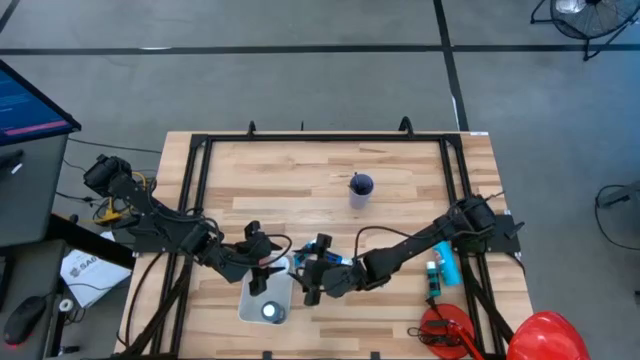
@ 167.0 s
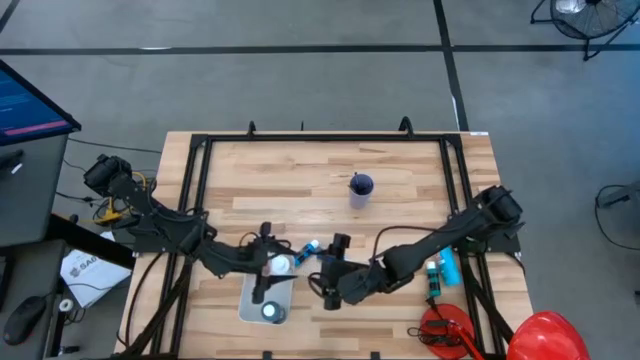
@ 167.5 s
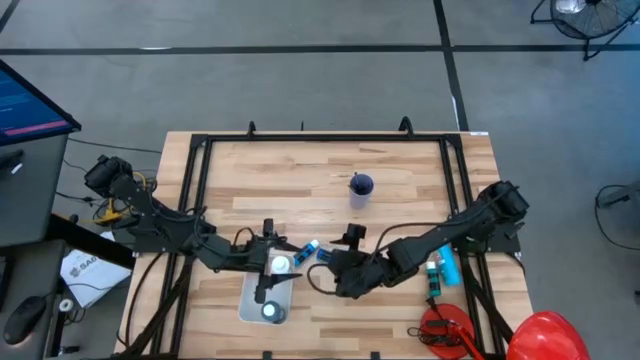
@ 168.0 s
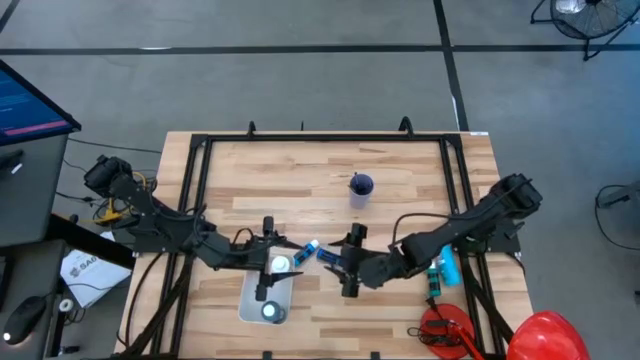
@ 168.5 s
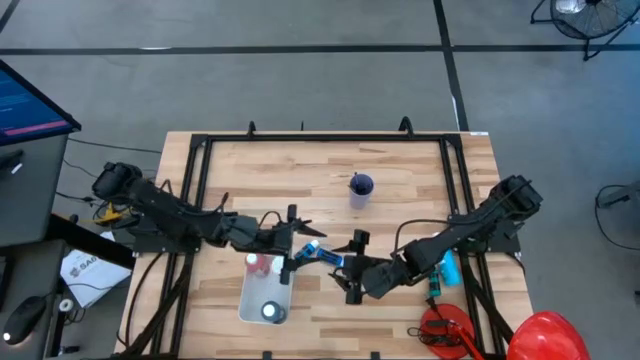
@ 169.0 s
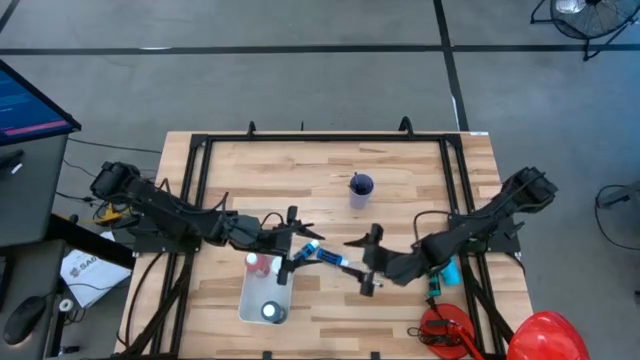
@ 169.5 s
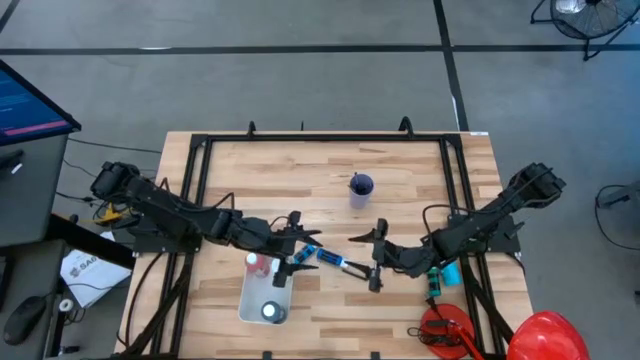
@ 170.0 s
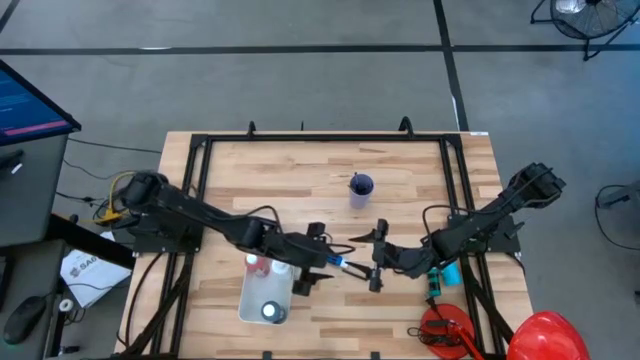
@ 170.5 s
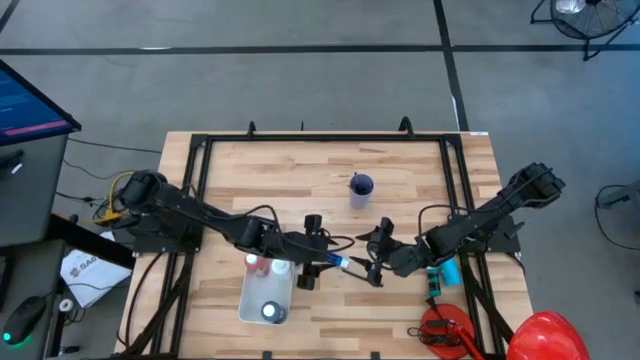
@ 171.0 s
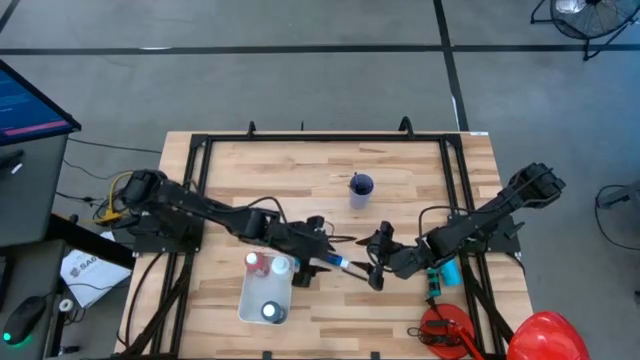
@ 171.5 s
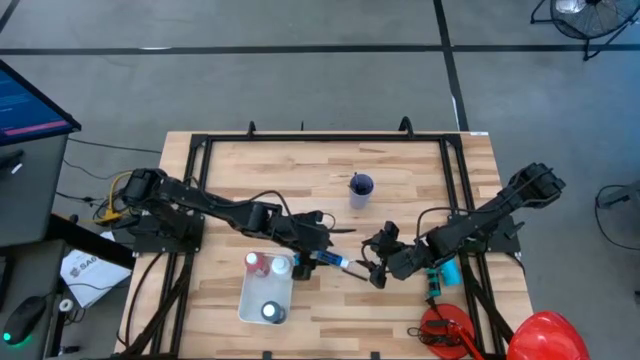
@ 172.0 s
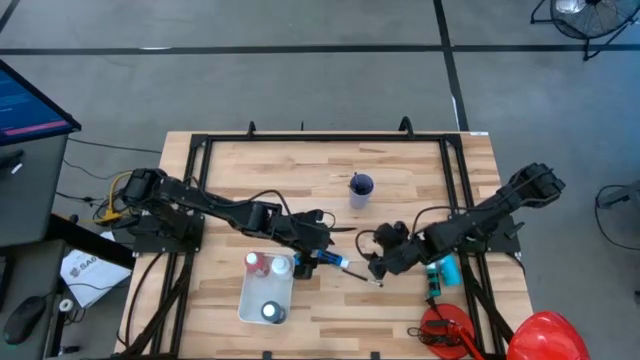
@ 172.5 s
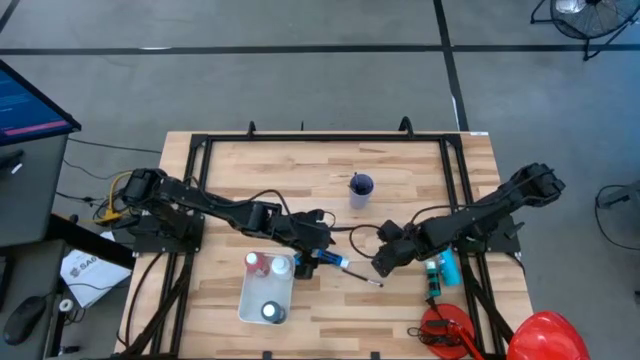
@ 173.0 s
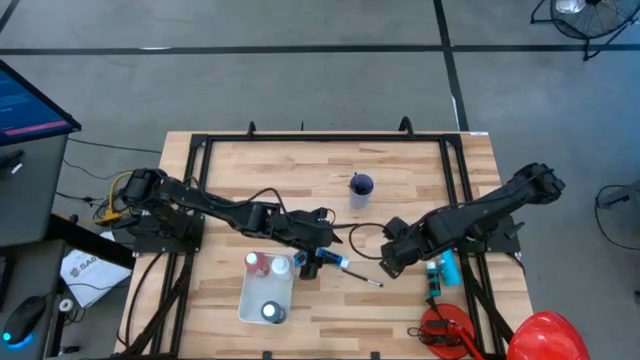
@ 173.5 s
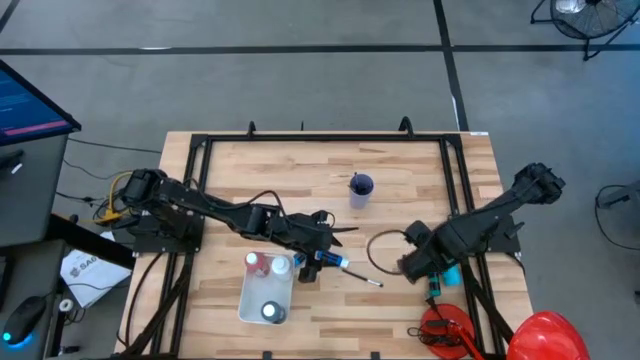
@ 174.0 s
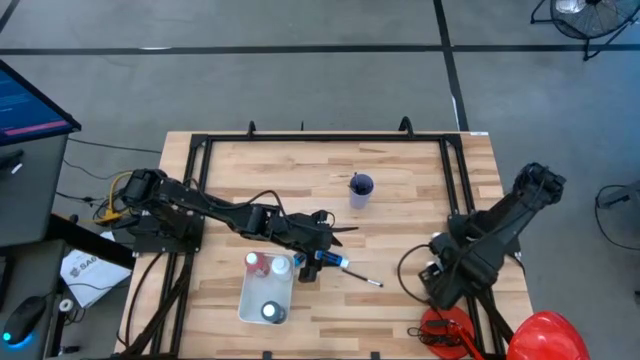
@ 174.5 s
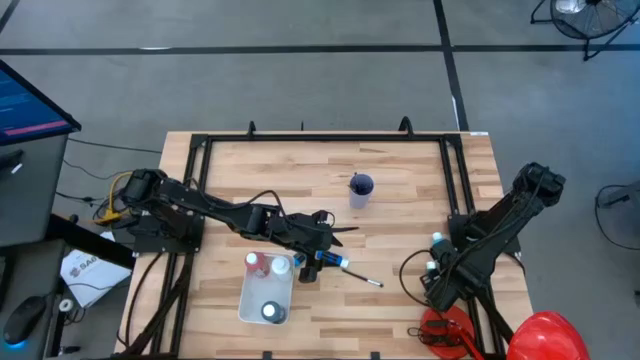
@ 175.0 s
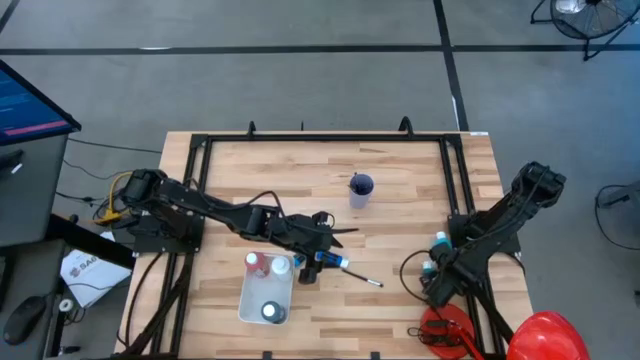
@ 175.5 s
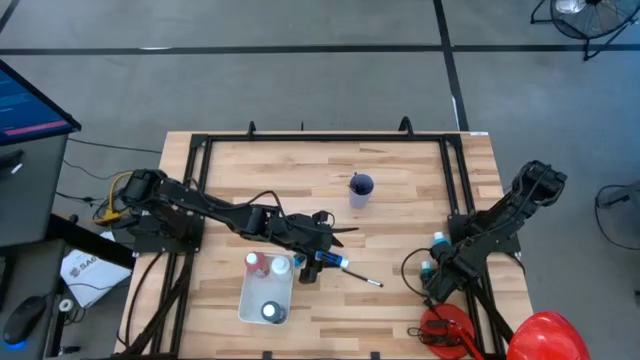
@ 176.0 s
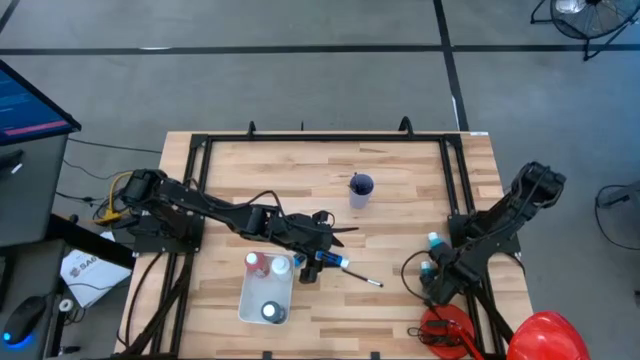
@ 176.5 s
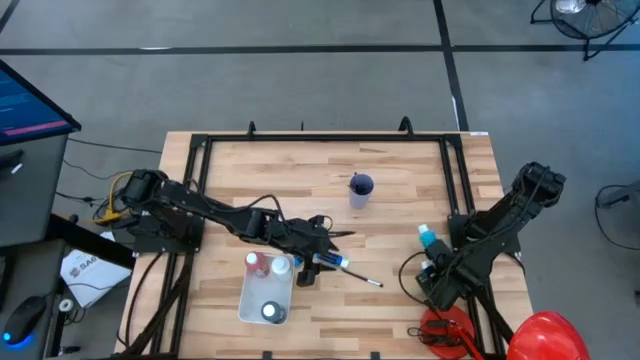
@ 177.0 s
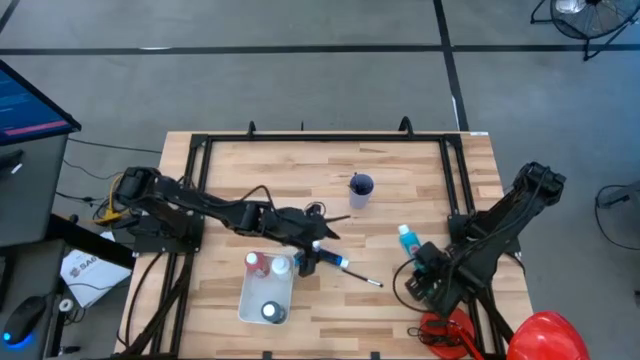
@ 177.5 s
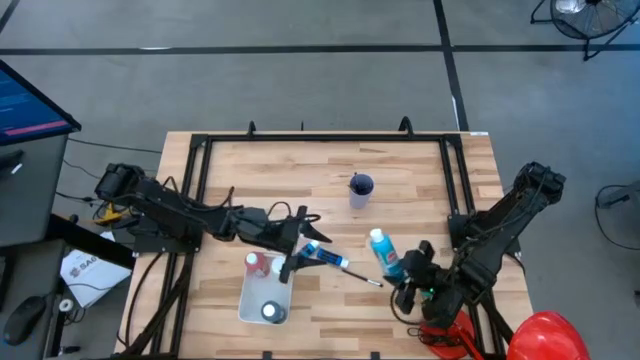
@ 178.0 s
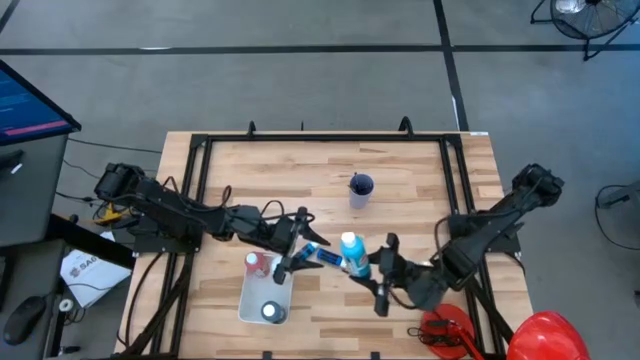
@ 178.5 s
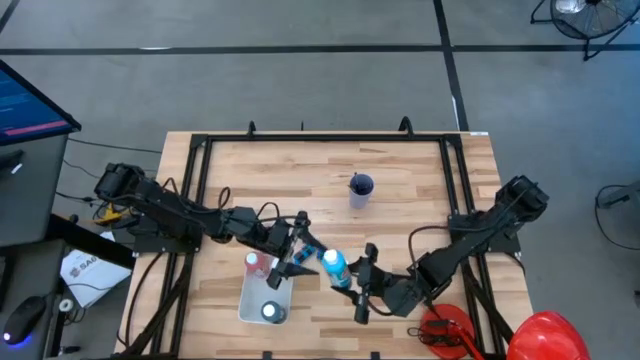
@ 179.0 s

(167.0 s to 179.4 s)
Task: Pick & Place Paint Supplies
Put the light blue paint bottle into the white bin

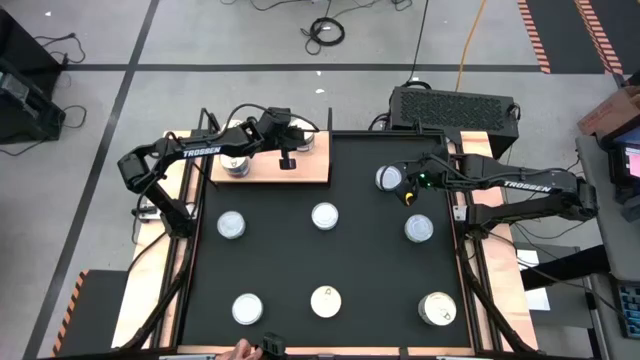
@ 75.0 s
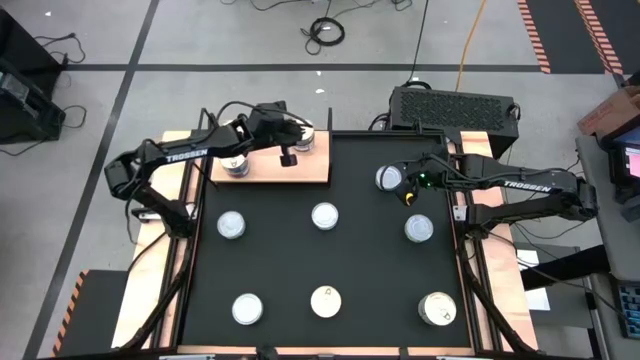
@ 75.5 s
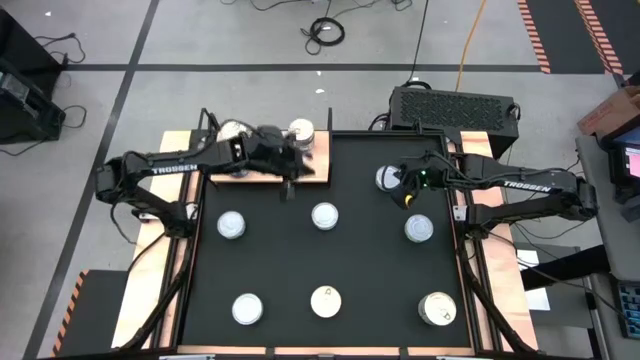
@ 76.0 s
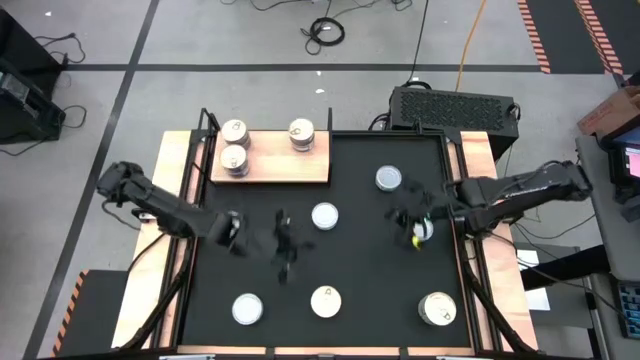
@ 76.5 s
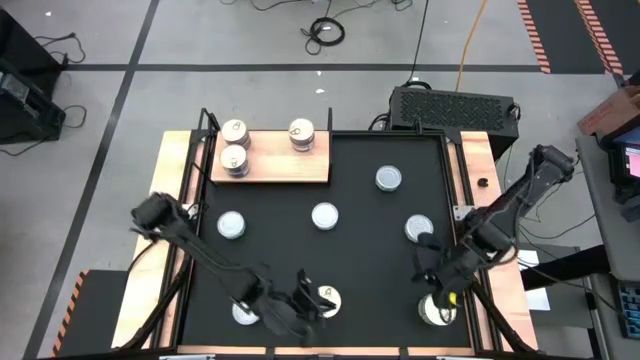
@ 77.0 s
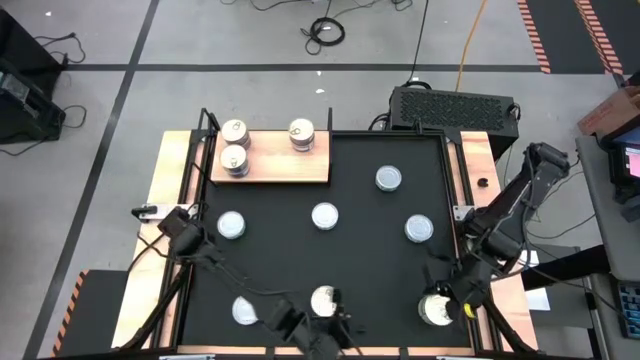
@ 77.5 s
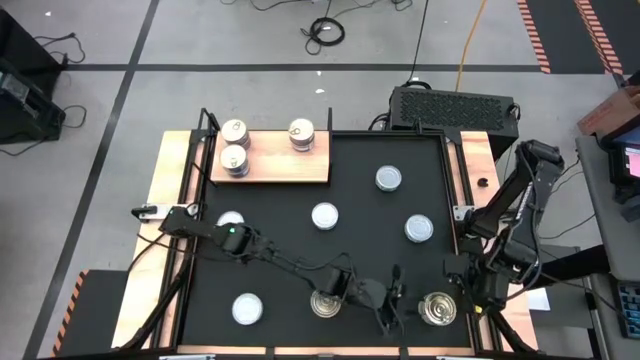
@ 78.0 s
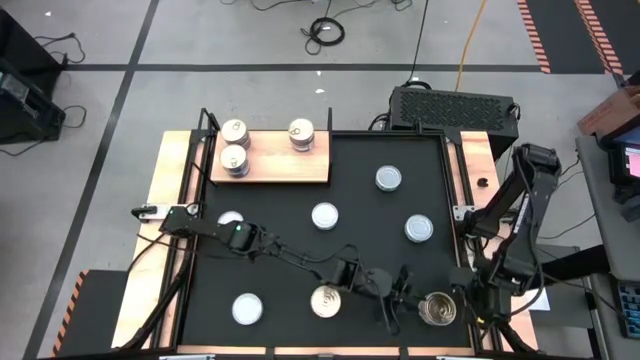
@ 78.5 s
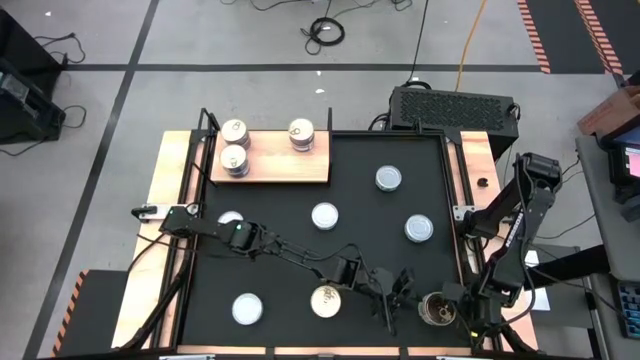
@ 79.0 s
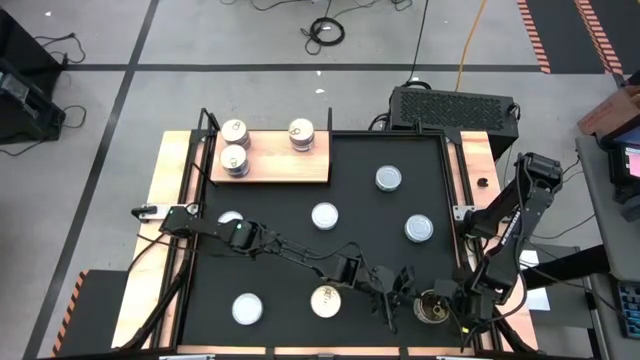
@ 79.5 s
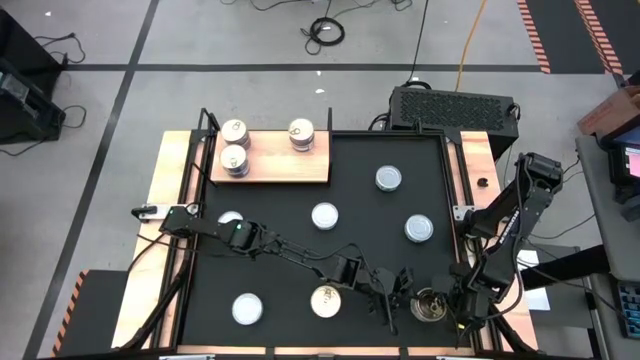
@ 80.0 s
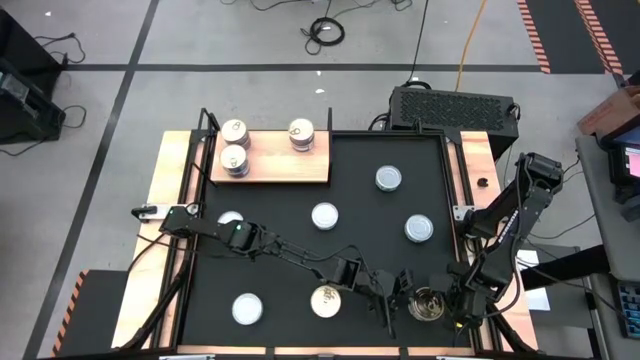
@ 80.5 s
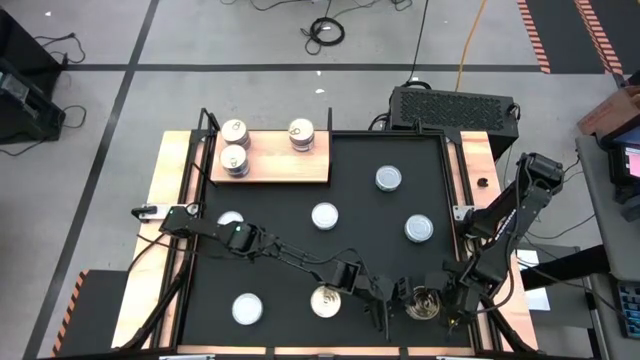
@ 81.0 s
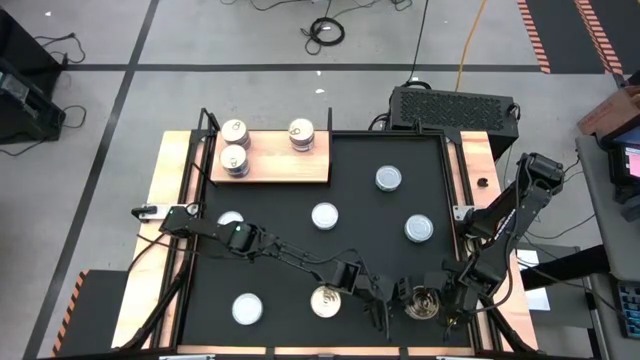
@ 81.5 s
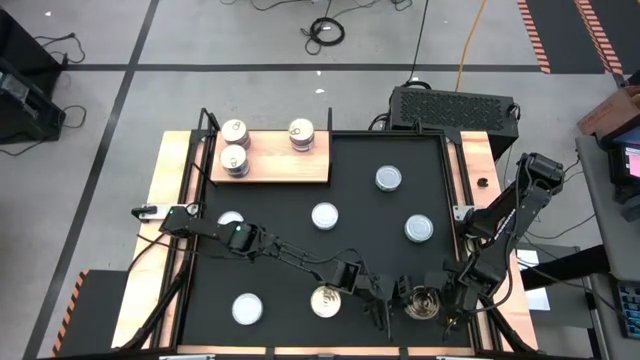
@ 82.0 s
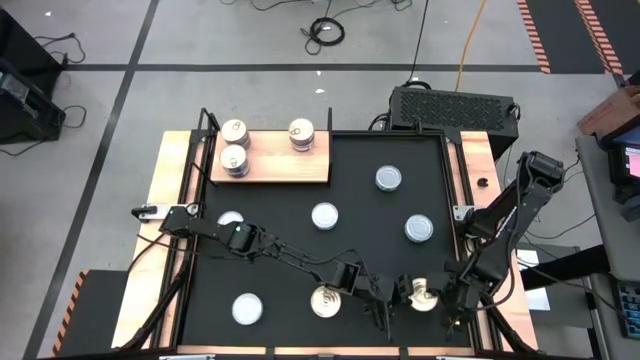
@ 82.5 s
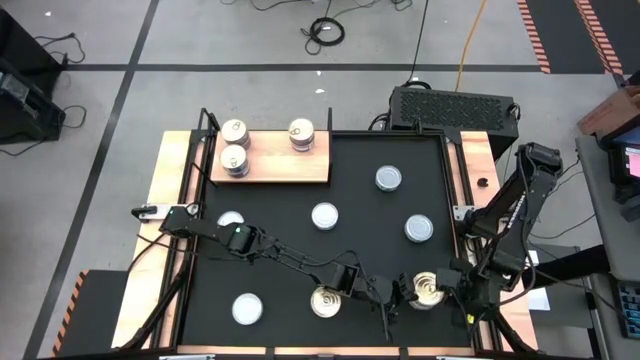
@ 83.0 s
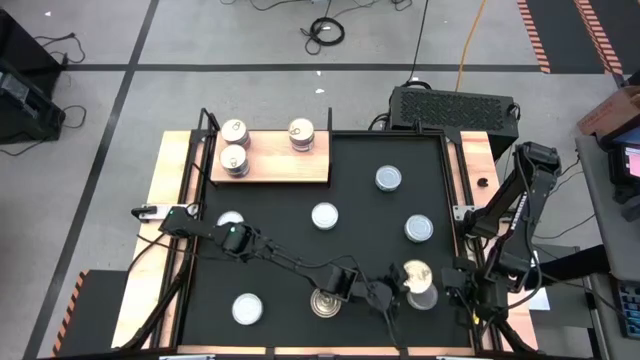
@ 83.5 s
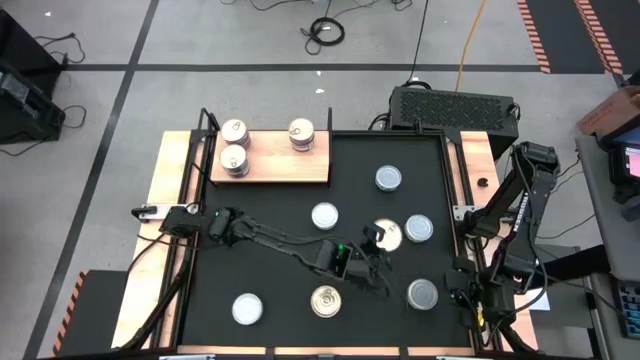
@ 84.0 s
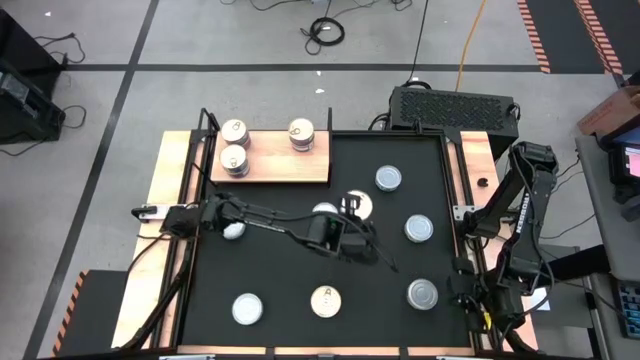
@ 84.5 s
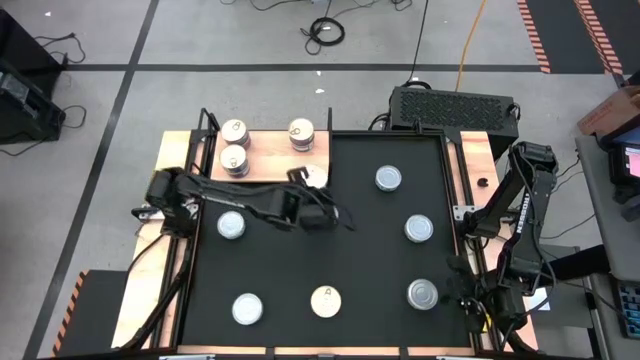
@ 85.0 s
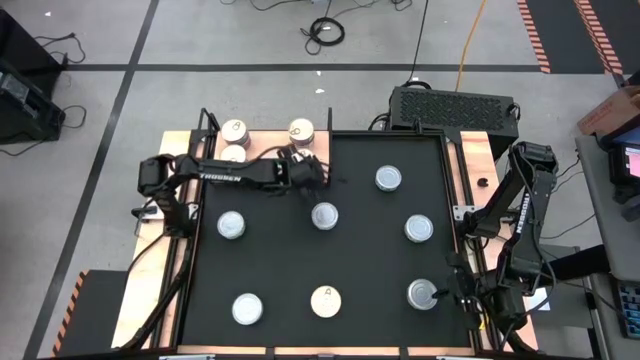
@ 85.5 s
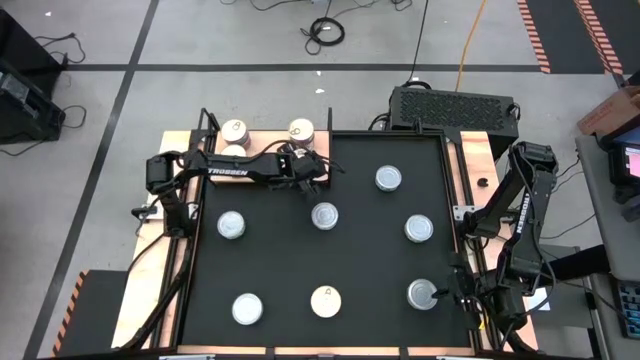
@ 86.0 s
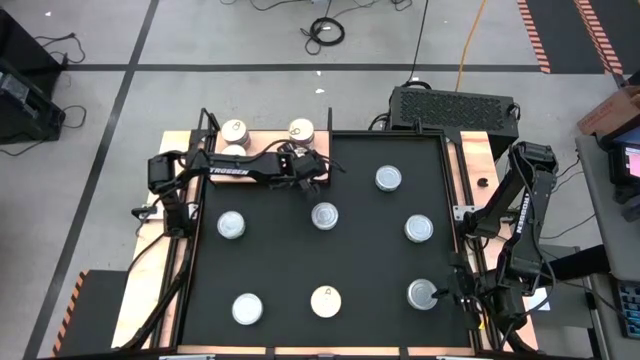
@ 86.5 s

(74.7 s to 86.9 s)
Task: Stack canned seafood by type on shelf
Put the blue tuna can on the shelf
